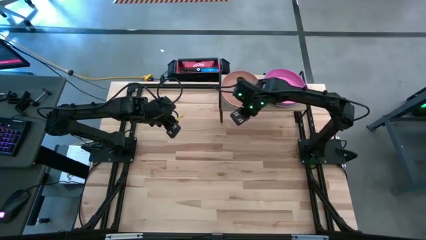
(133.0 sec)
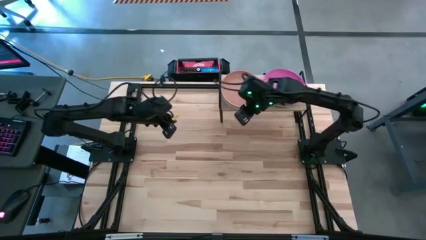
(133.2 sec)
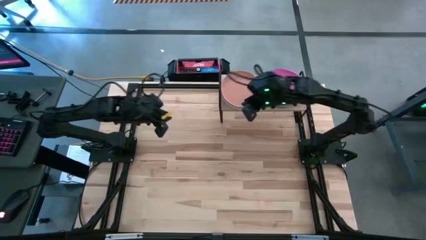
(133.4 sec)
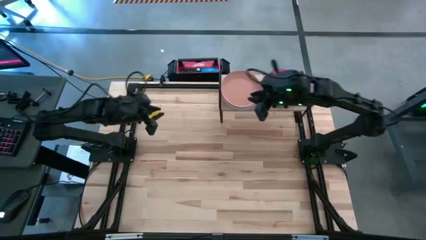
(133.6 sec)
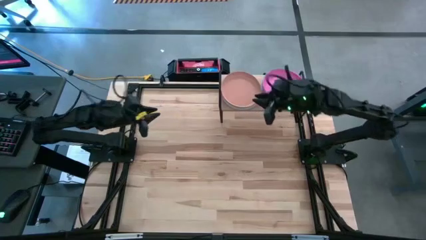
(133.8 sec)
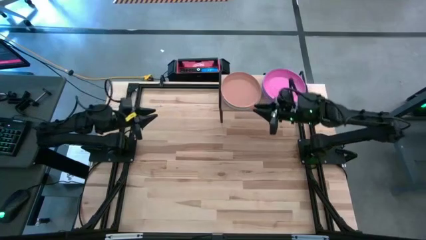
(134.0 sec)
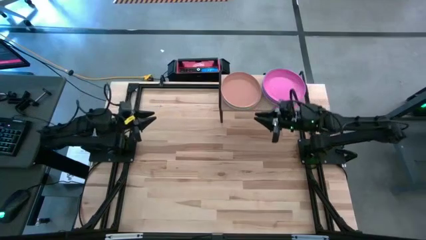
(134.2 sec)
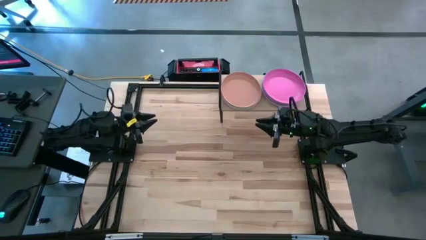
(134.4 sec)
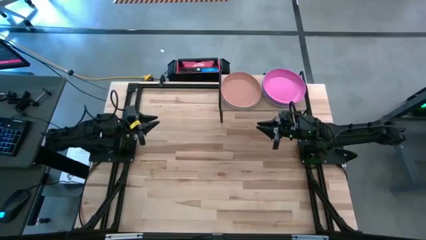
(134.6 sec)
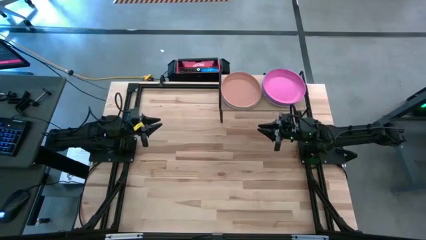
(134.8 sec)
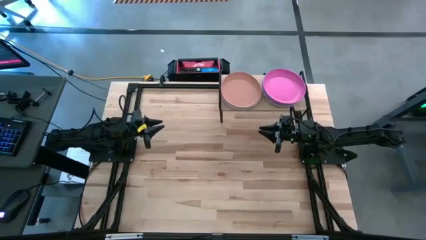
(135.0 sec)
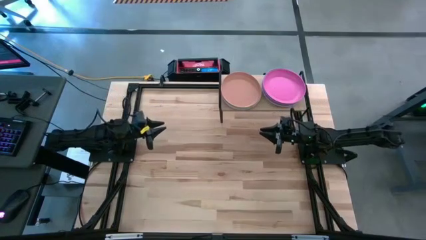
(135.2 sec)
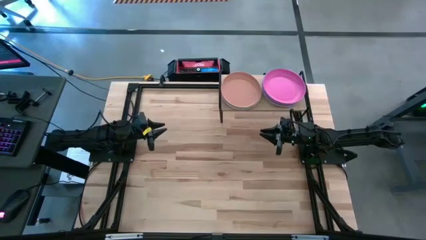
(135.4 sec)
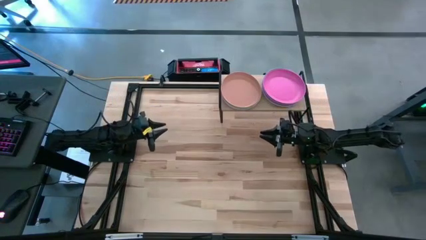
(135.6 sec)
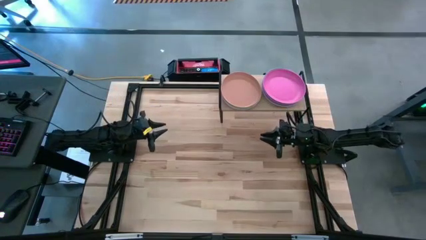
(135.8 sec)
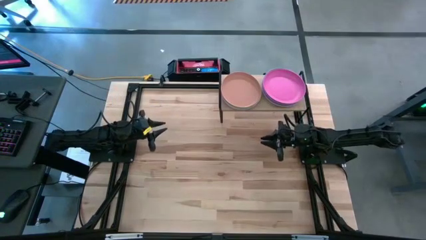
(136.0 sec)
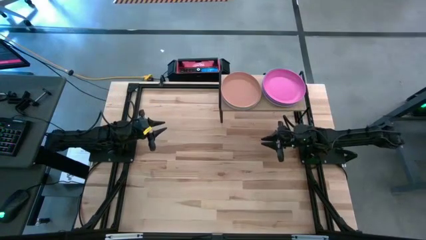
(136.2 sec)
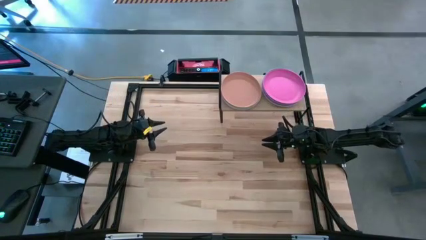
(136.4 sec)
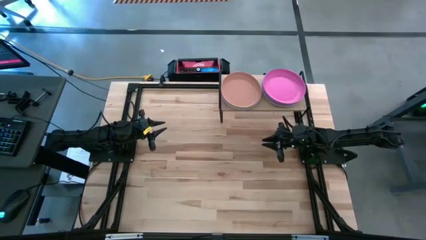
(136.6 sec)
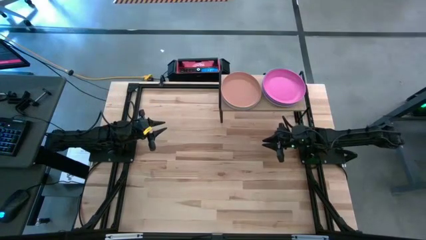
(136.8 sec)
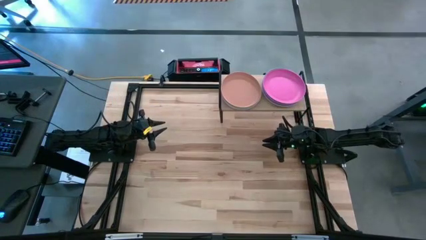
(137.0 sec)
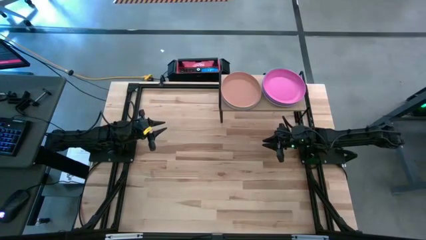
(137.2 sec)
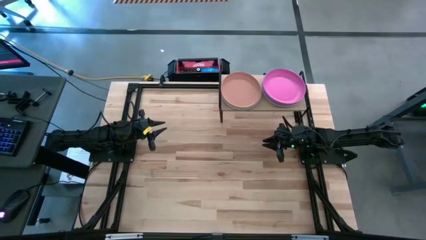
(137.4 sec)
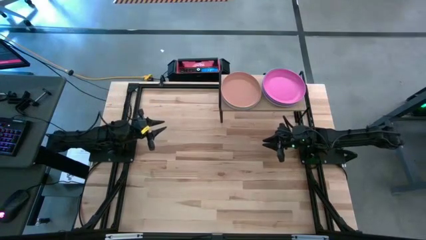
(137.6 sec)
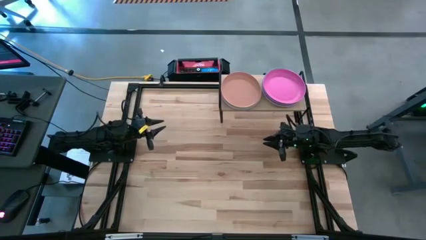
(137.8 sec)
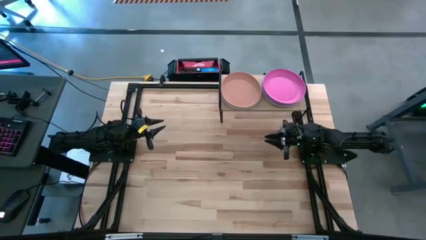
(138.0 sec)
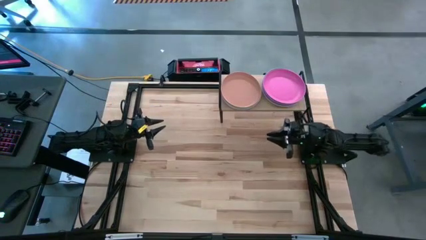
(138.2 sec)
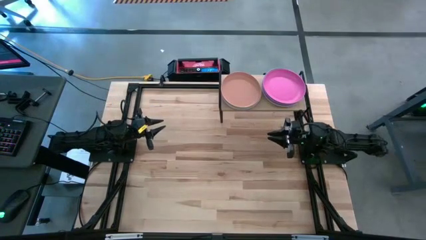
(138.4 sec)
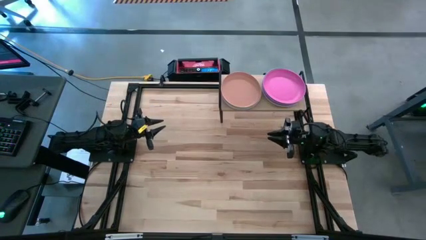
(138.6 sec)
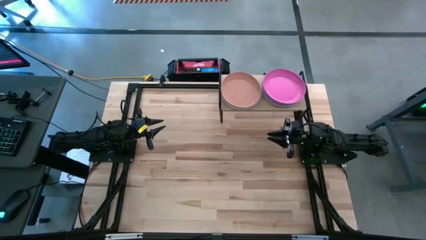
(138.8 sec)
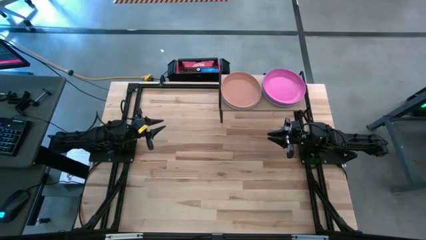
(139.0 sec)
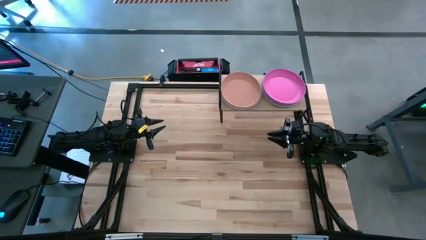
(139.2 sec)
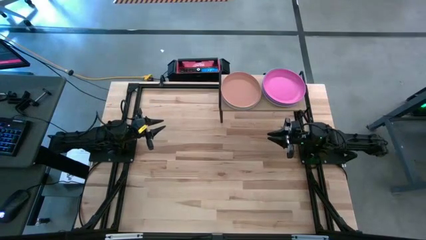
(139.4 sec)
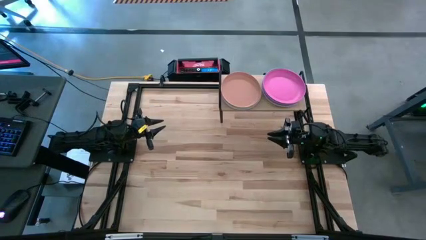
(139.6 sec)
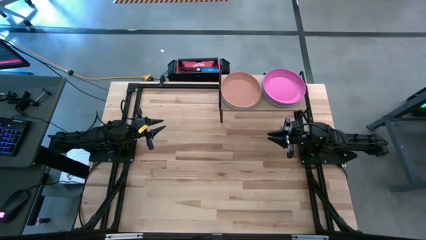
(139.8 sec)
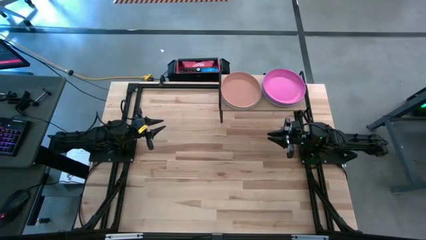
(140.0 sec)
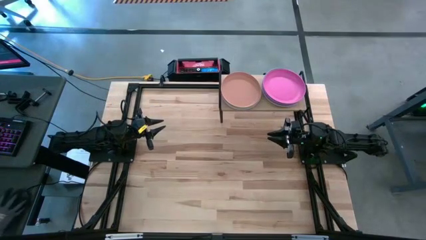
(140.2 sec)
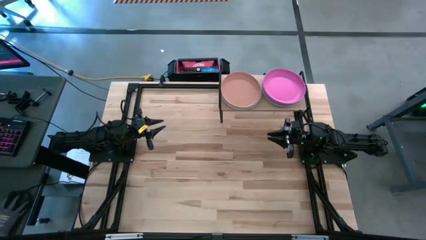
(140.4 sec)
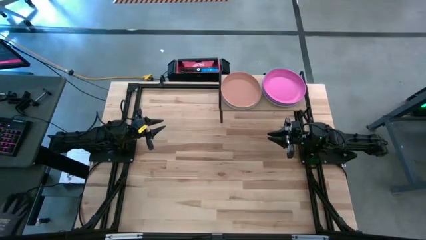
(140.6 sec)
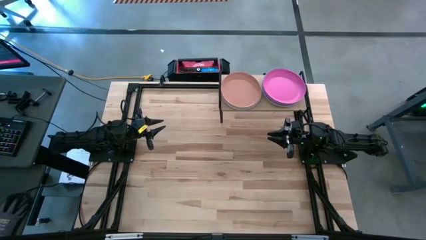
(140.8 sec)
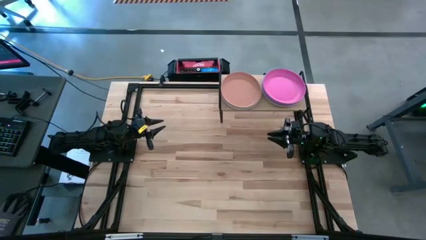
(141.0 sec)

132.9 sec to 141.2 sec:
Task: Place and stack plates onto a shelf
Return to Home Position

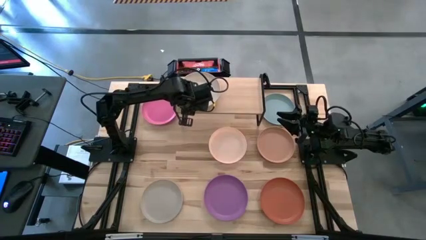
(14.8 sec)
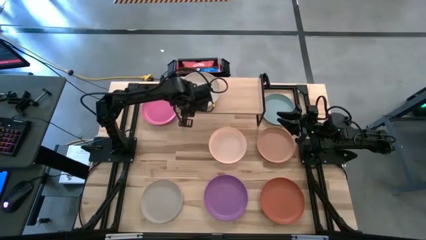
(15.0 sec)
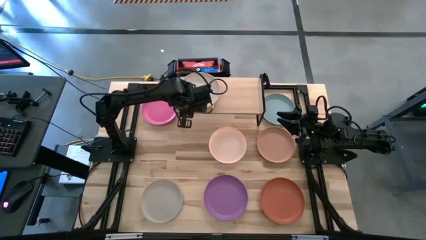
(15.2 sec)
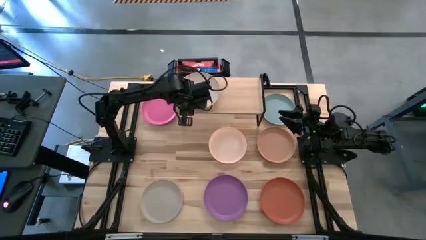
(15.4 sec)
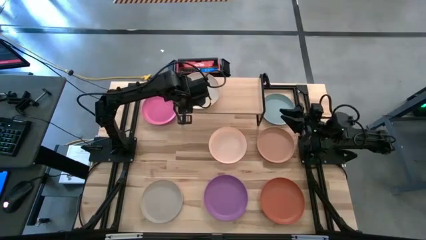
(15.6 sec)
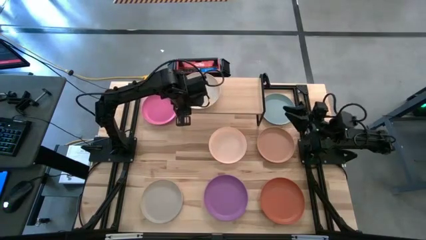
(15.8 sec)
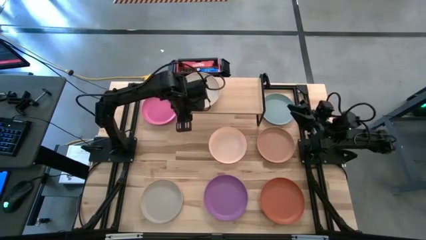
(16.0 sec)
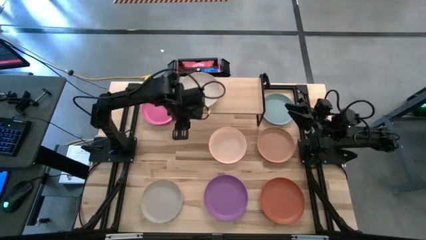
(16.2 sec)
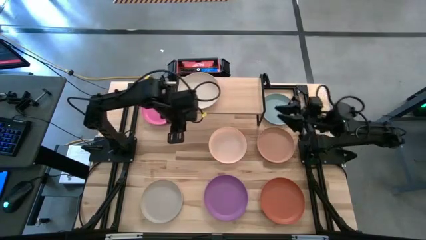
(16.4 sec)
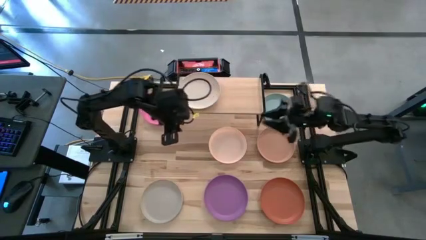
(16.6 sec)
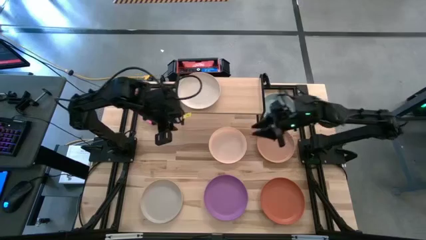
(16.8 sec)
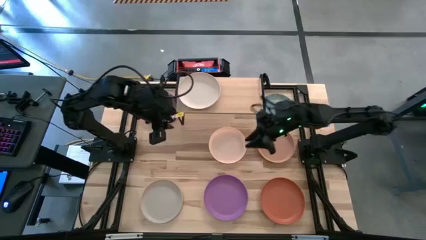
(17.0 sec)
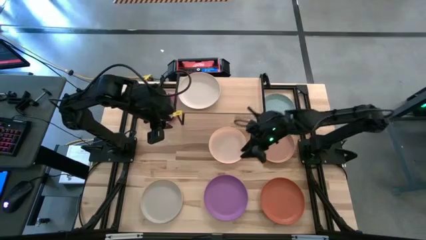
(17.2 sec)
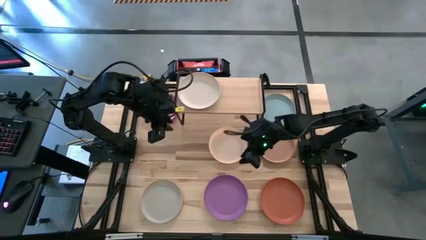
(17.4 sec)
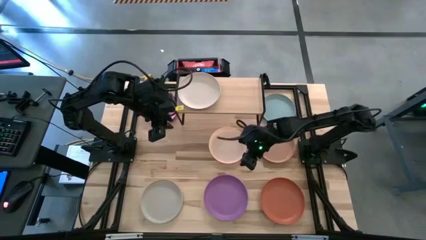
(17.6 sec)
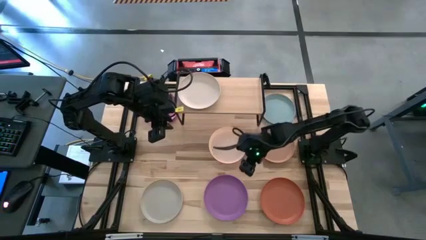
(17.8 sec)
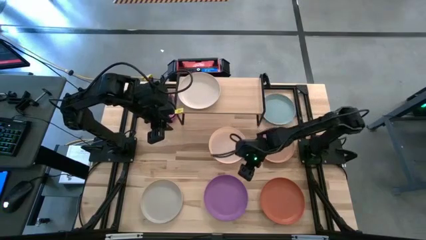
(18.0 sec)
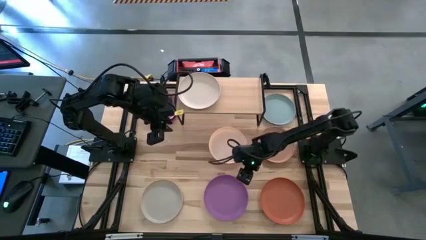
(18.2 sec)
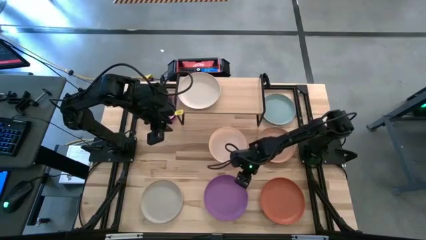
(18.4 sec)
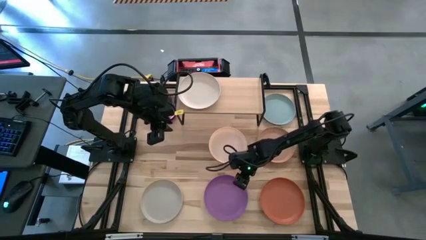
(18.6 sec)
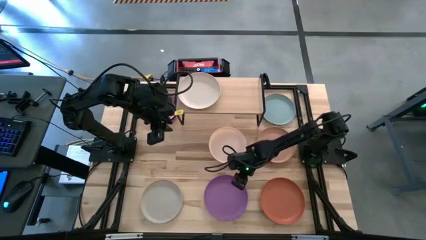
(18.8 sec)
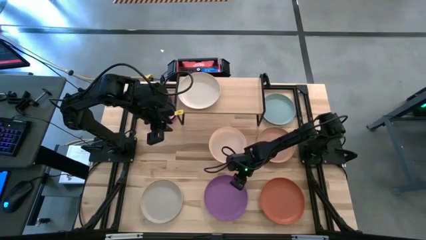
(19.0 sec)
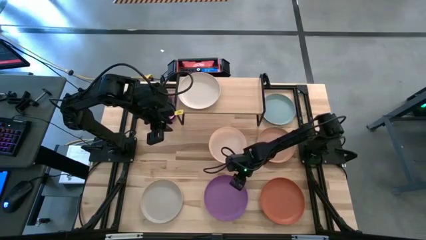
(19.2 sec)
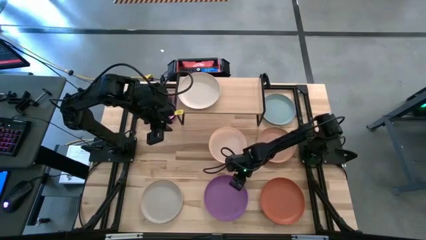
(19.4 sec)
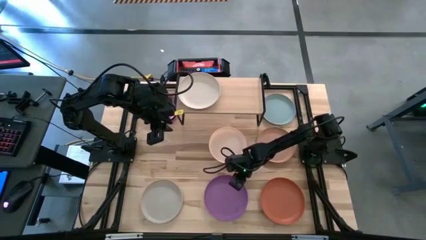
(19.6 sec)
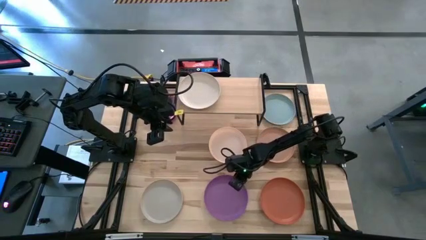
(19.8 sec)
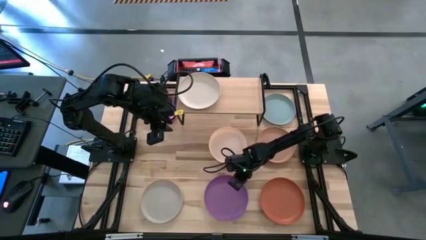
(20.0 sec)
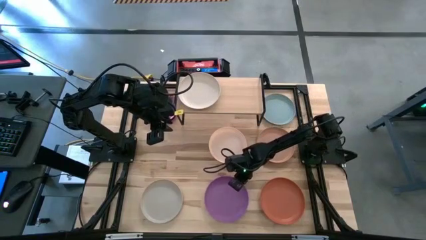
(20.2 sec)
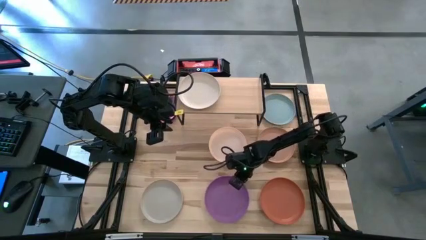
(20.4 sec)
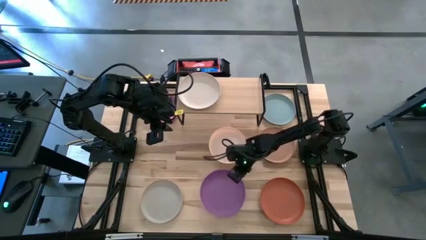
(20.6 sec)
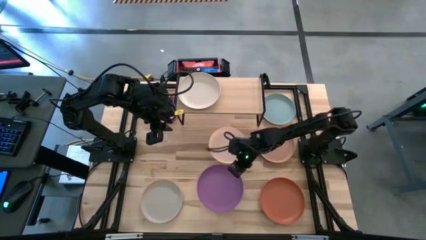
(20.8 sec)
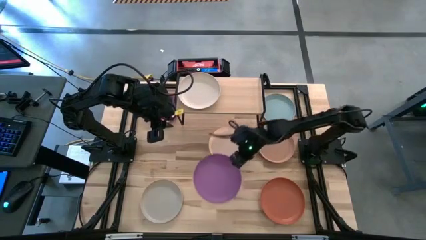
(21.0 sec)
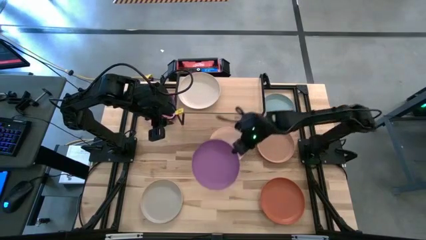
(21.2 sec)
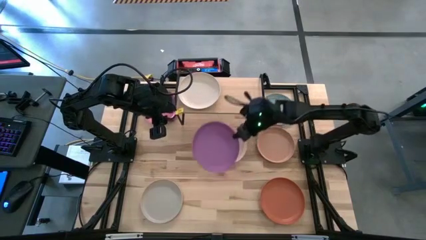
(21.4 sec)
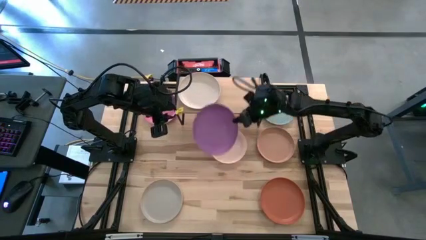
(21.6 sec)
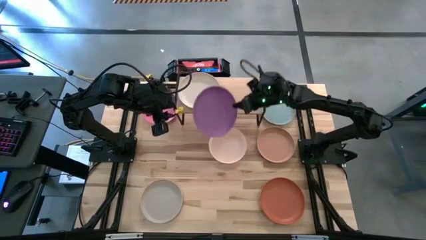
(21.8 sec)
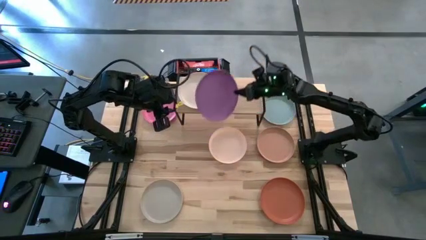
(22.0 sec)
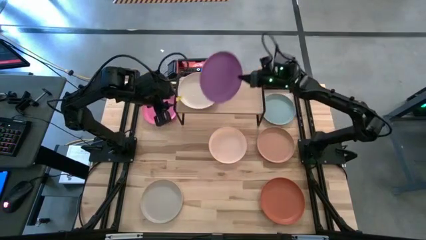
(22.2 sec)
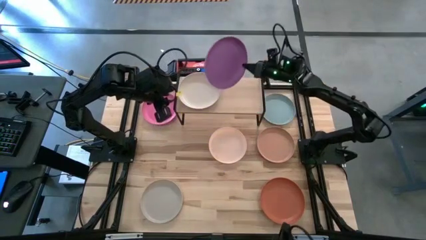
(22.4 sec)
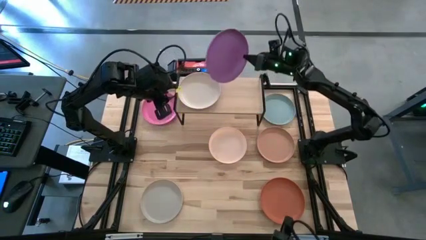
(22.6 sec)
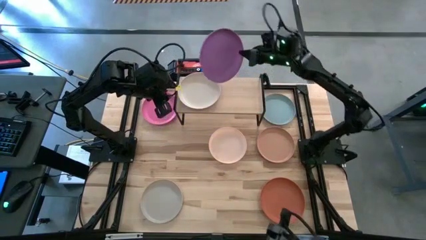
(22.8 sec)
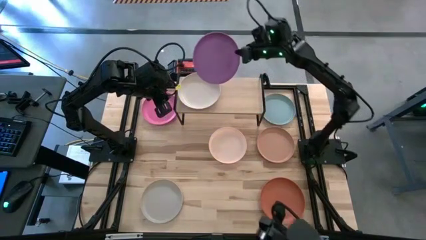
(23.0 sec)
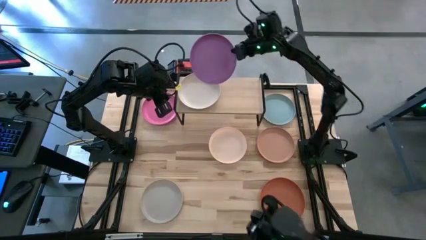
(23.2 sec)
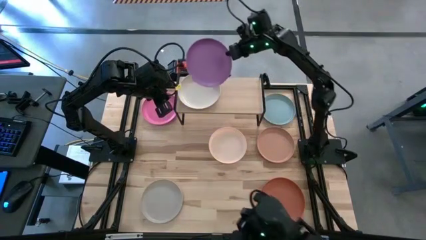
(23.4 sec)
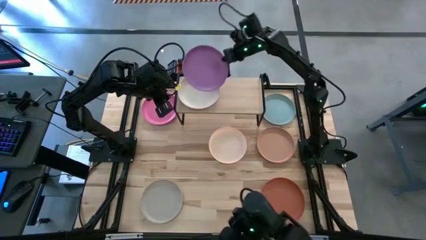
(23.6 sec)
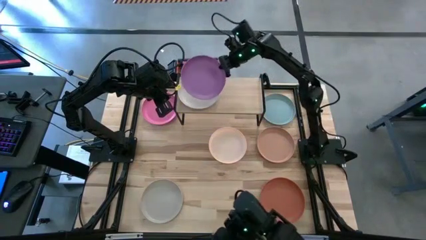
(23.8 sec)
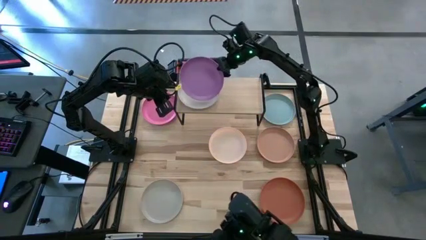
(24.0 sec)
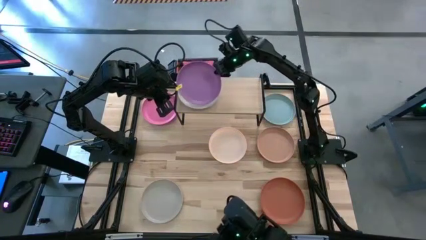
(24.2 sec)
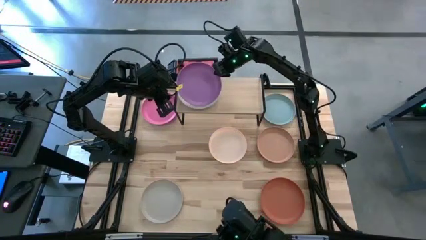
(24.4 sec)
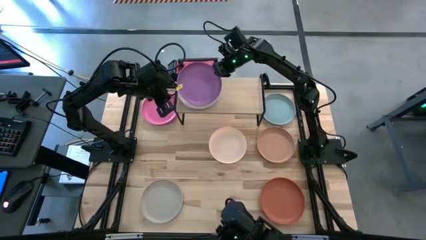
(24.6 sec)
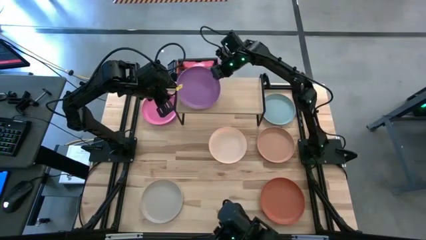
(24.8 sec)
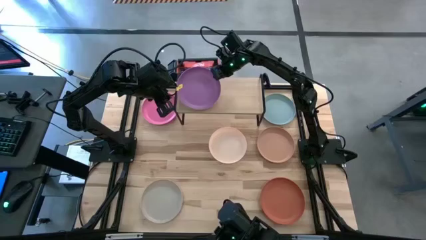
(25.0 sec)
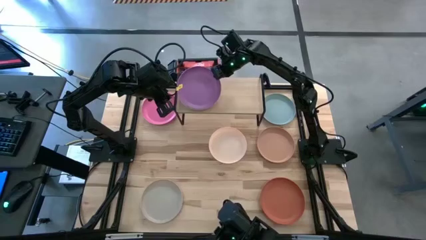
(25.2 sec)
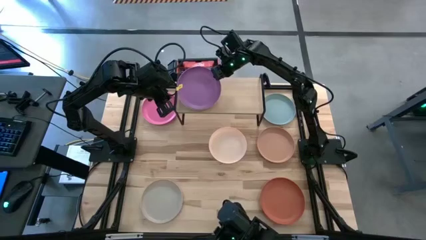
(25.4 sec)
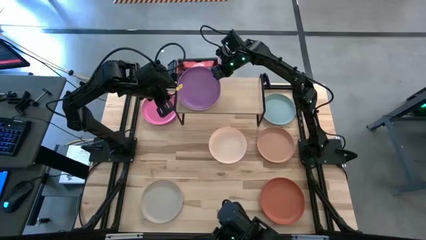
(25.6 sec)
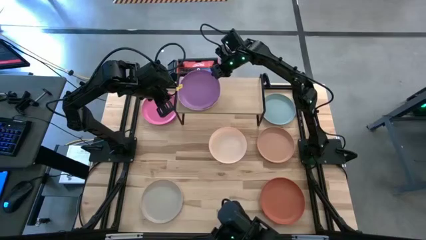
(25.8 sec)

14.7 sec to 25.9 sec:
Task: Place and stack plates onto a shelf
Stack the purple plate on top of the white plate on the shelf
